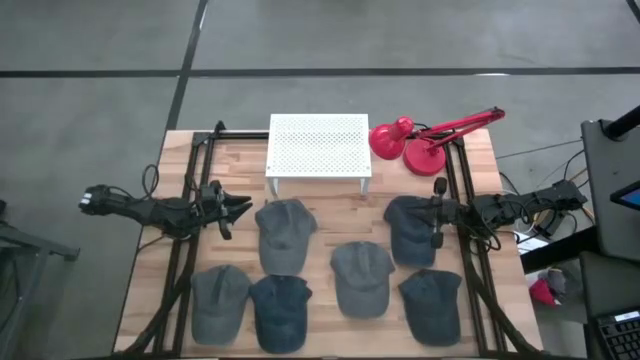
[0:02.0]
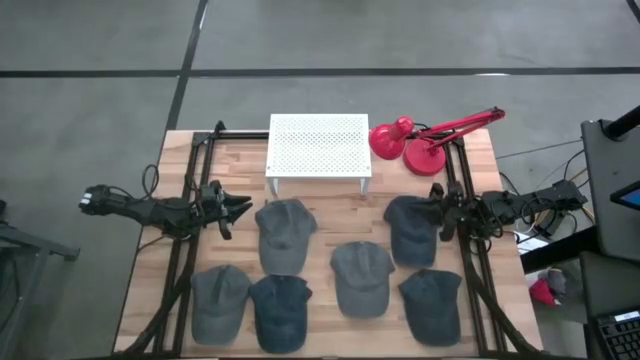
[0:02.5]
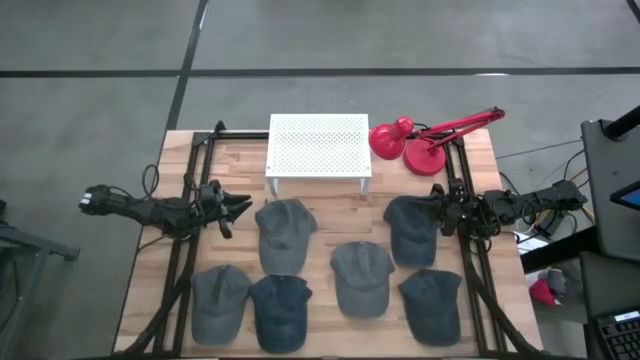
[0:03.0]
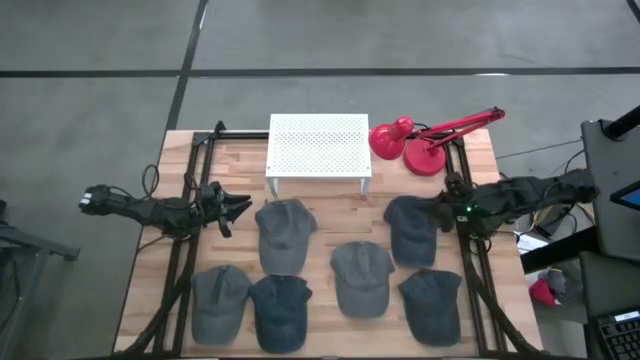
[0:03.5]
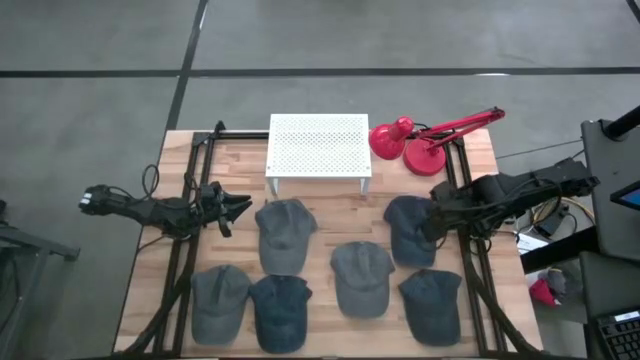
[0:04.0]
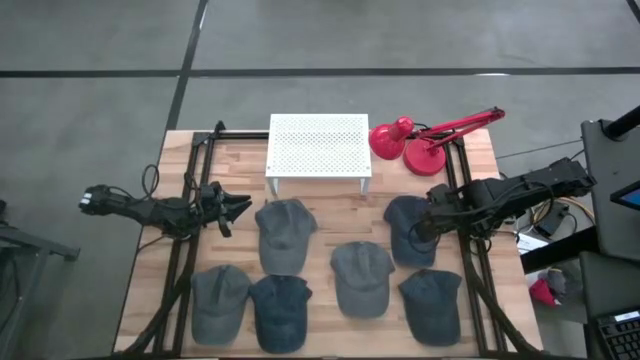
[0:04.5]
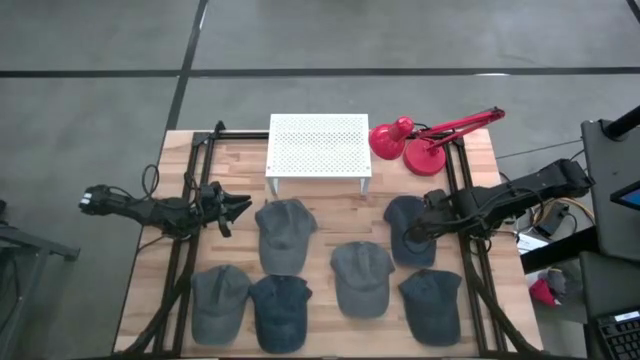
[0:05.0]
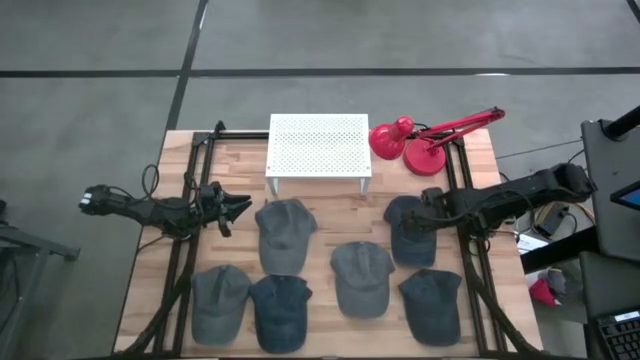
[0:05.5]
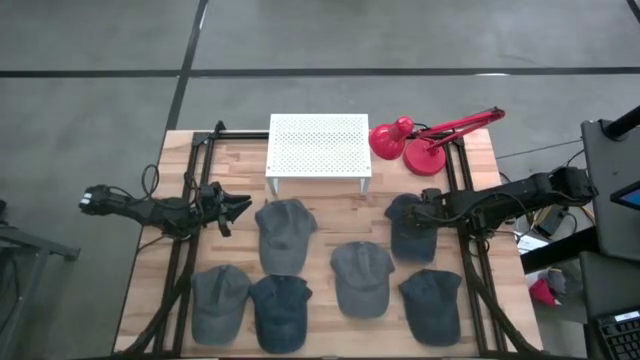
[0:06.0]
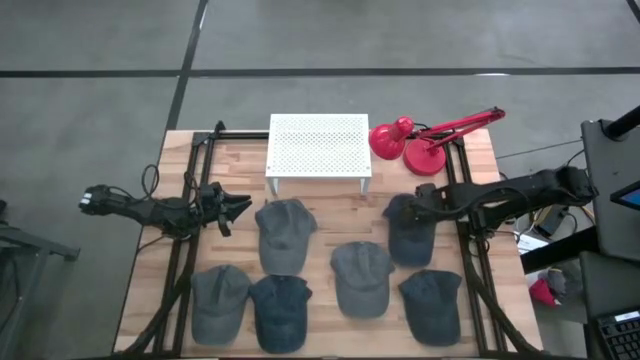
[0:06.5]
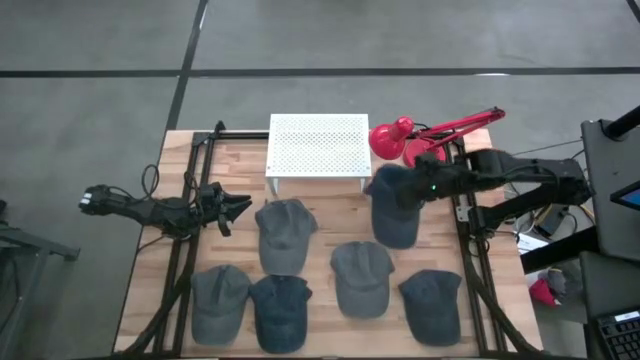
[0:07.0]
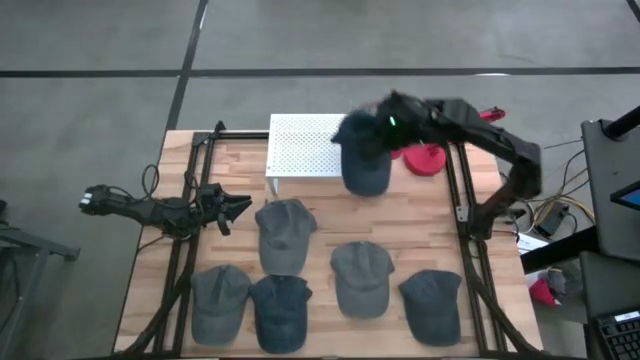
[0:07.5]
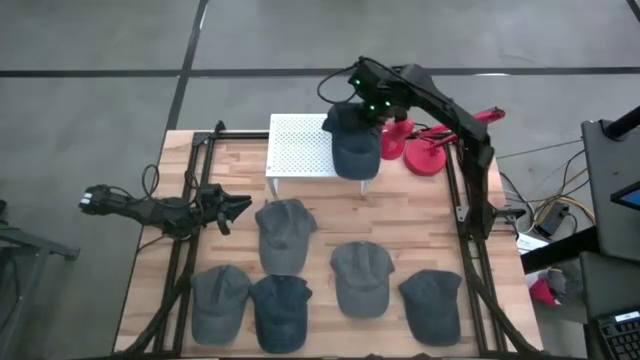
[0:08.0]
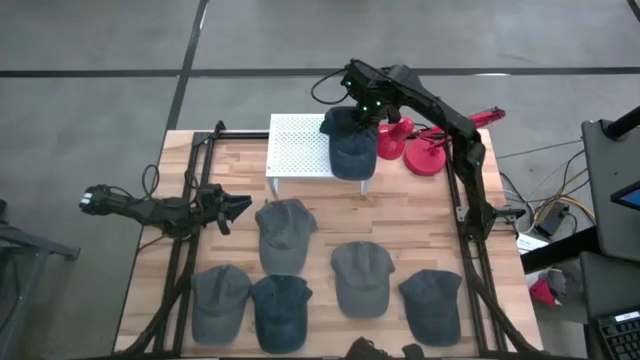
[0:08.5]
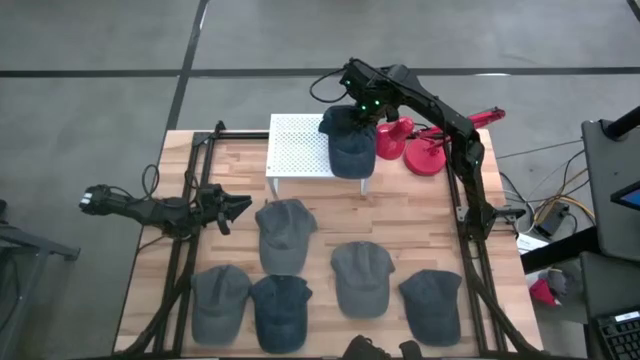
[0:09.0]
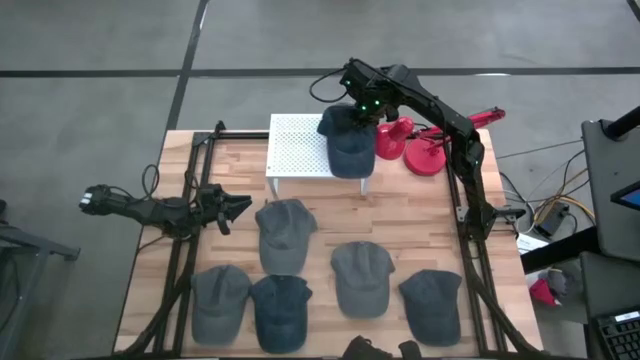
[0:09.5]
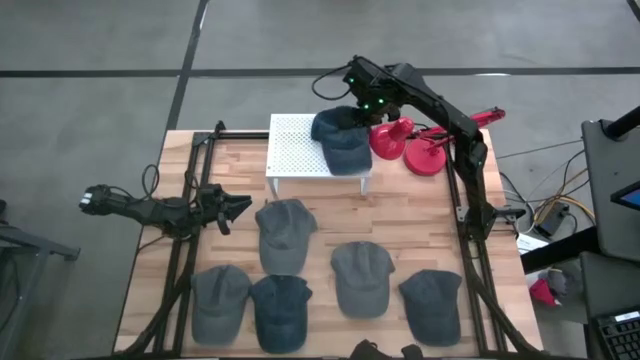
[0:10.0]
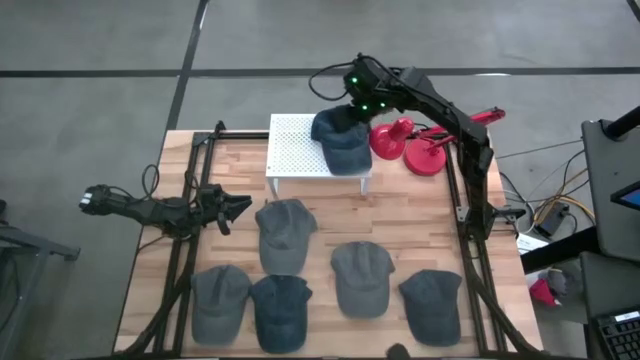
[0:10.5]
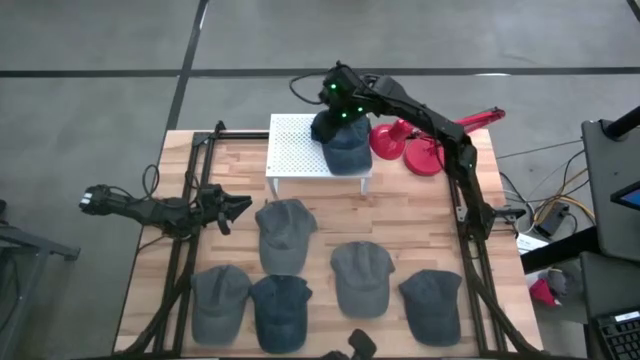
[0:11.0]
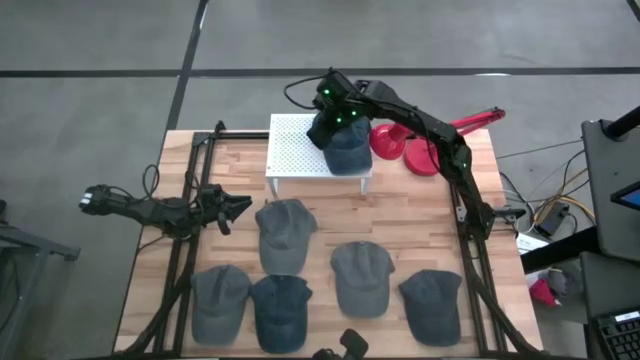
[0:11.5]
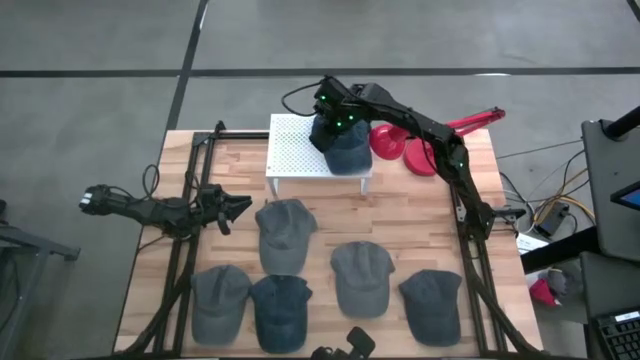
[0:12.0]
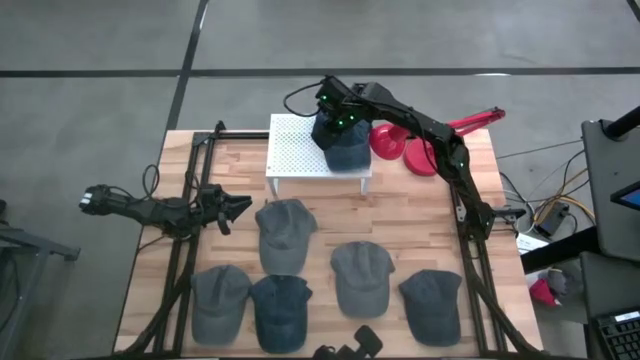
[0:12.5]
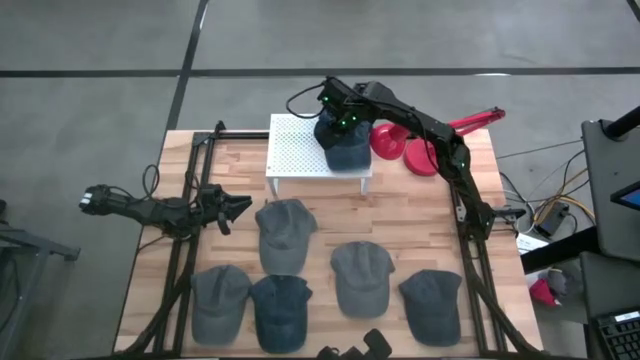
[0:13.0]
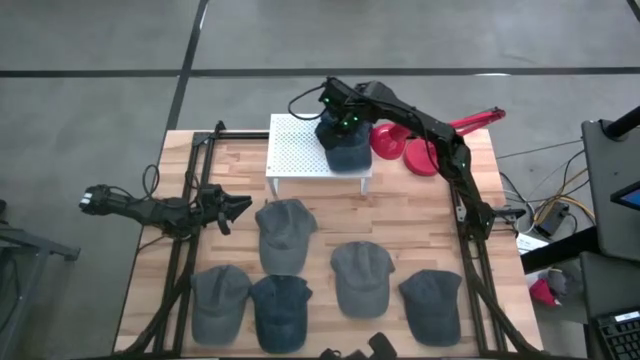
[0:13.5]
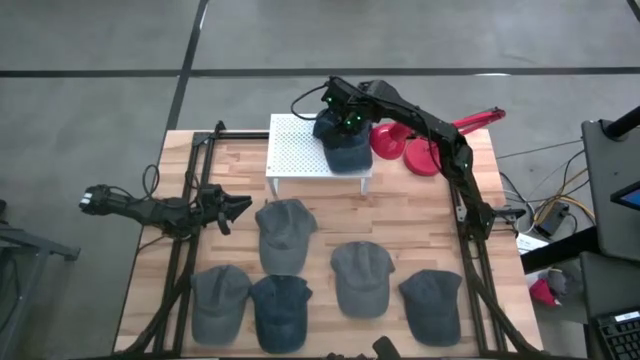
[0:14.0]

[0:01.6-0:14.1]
Task: Pick & Place hat
Put the top blue cap on the shelf

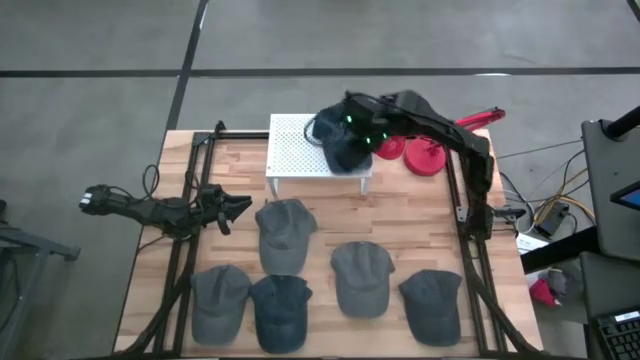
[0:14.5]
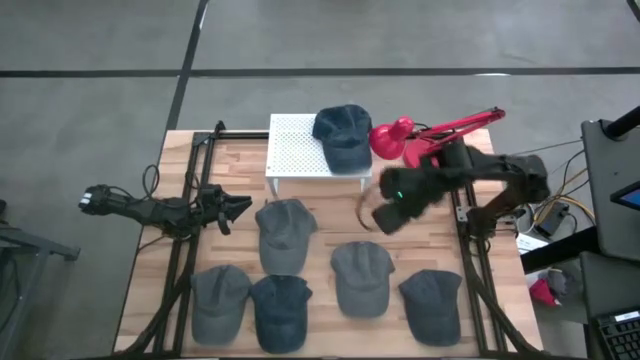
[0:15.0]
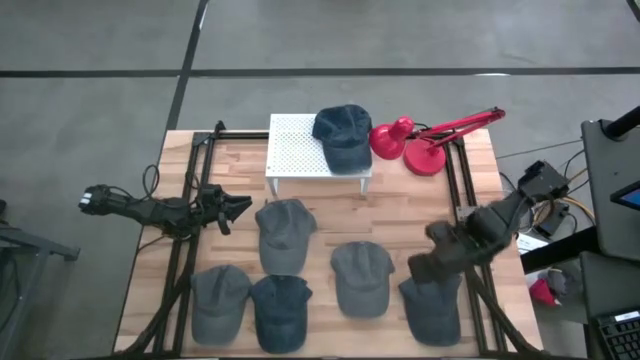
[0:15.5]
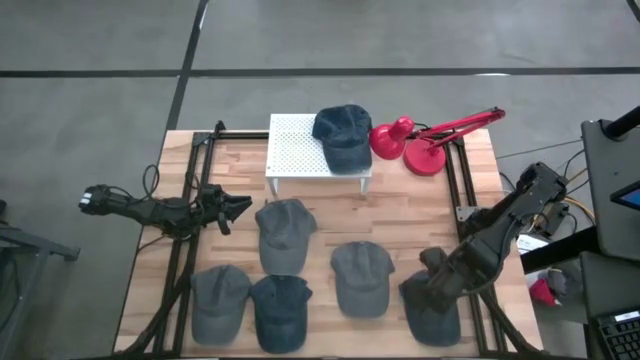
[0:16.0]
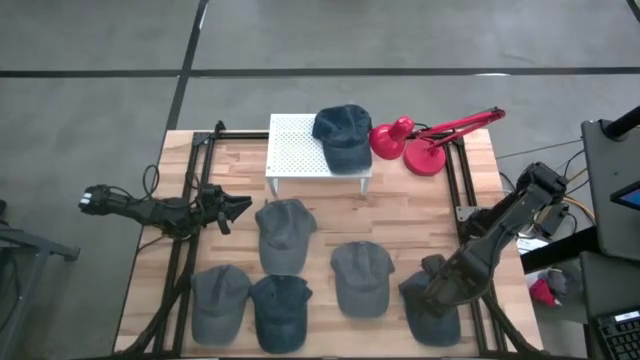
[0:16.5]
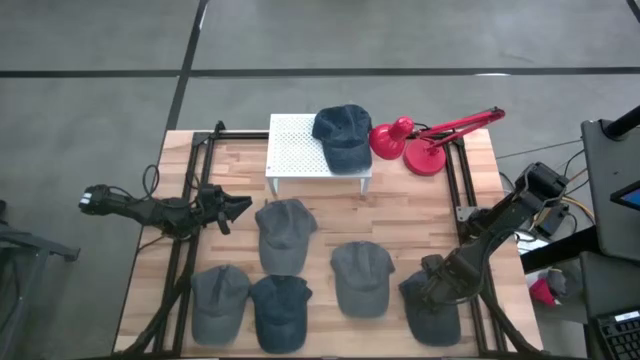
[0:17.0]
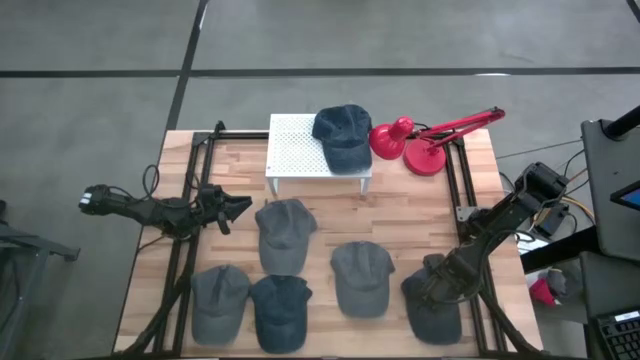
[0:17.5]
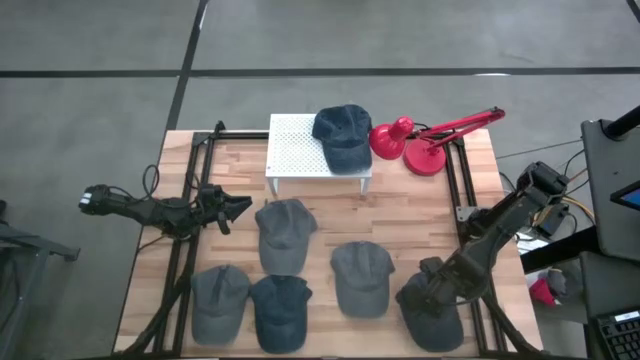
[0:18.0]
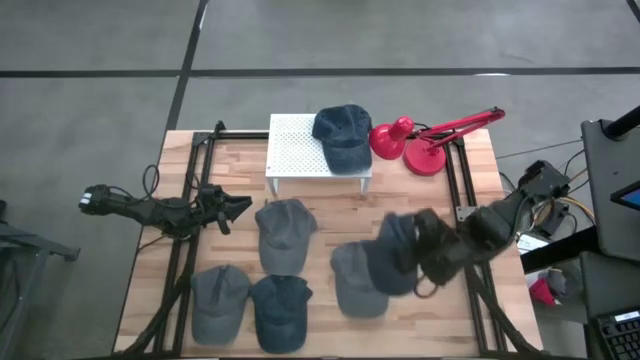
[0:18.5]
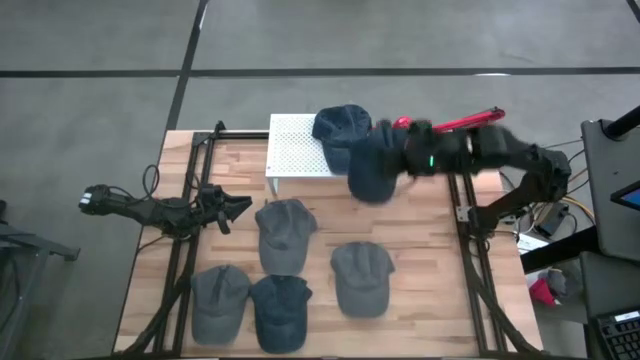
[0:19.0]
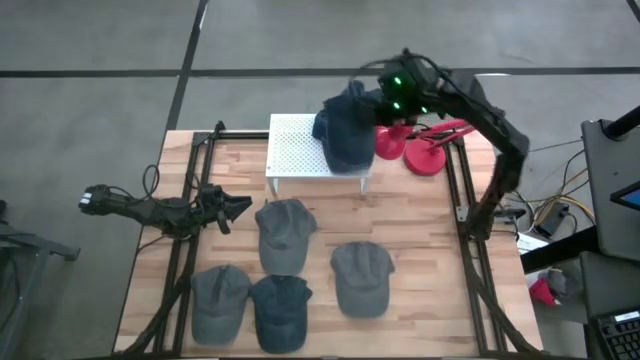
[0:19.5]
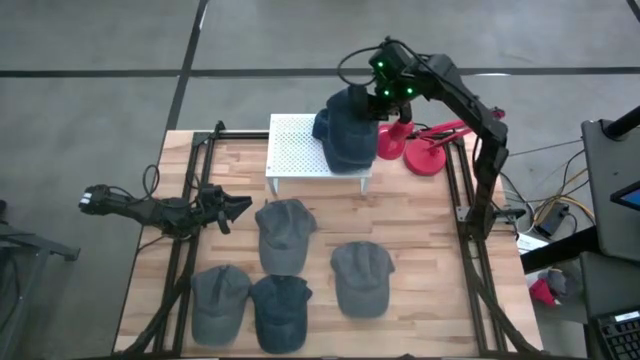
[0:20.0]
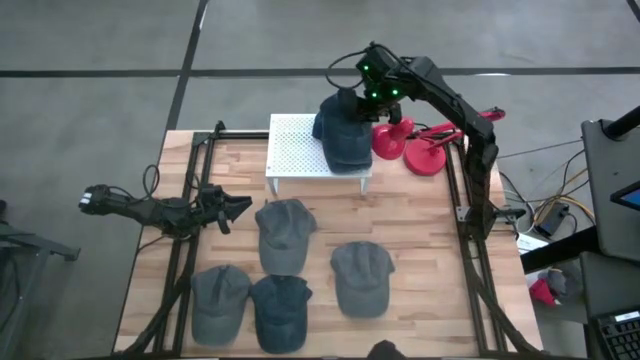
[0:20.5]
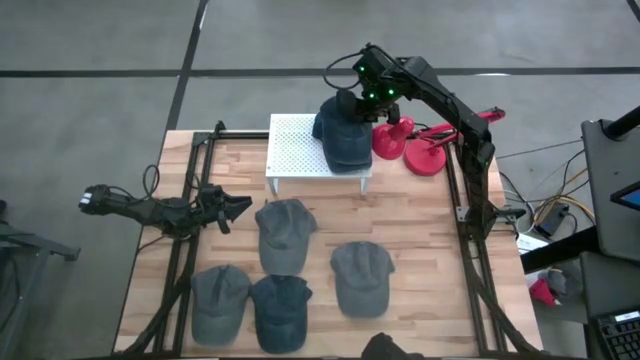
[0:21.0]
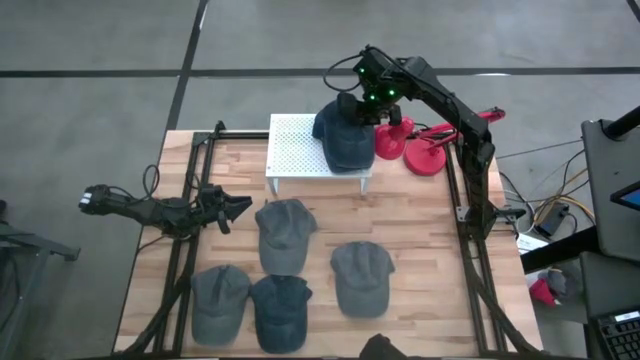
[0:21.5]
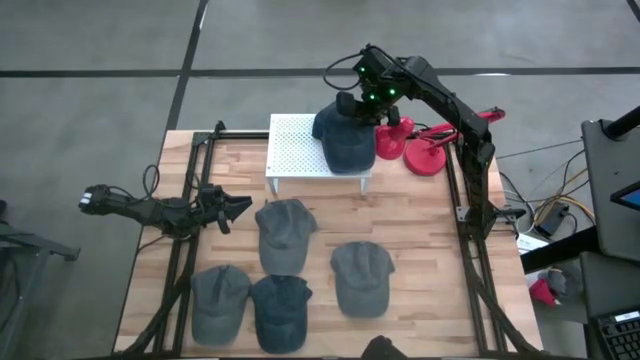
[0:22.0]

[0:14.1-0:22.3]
Stack the right blue cap on the blue cap on the shelf
